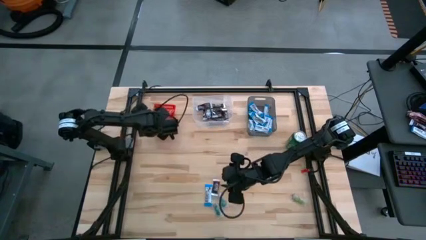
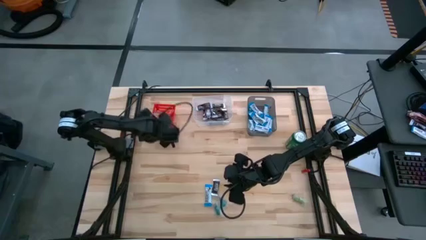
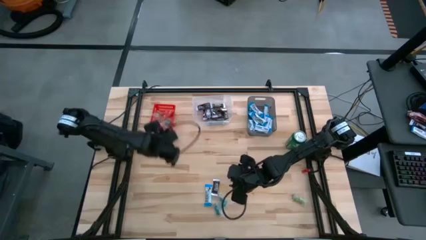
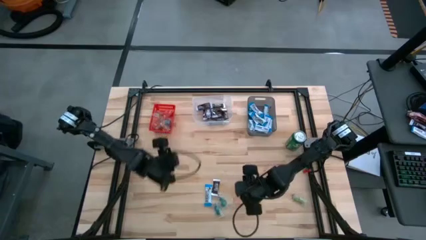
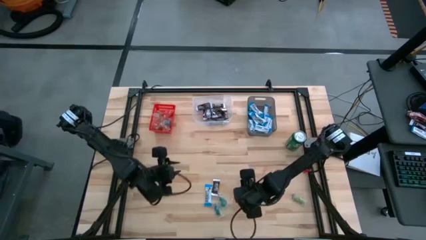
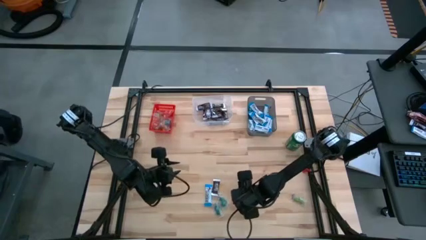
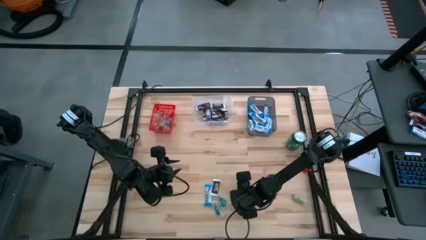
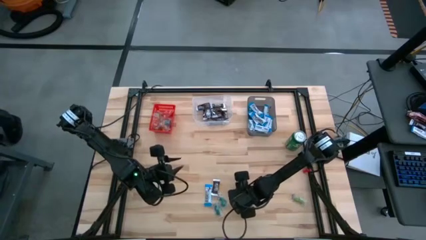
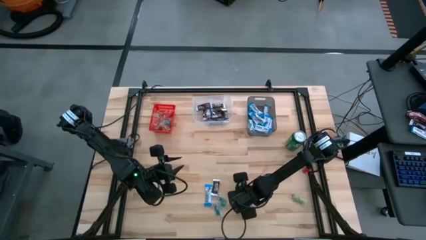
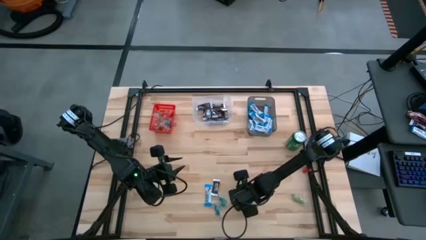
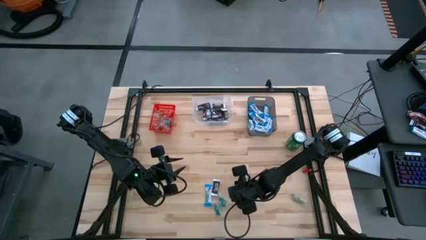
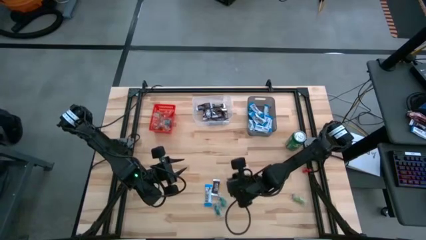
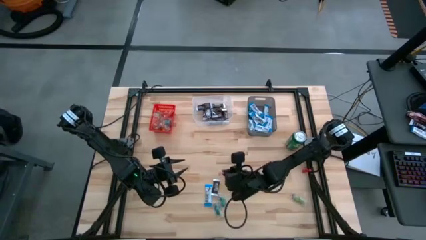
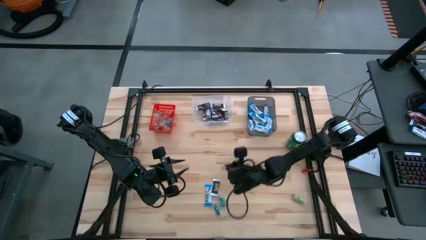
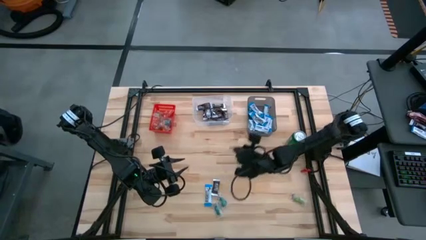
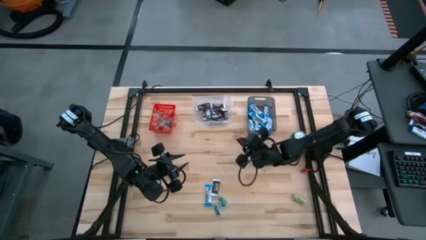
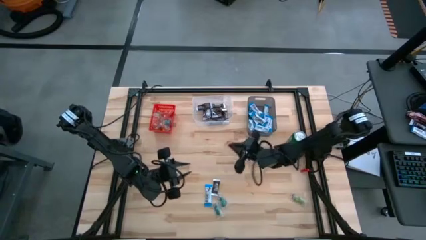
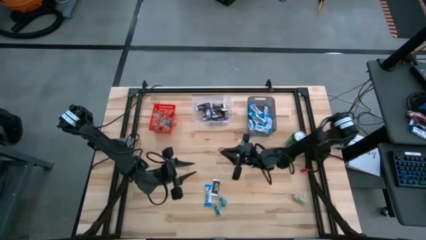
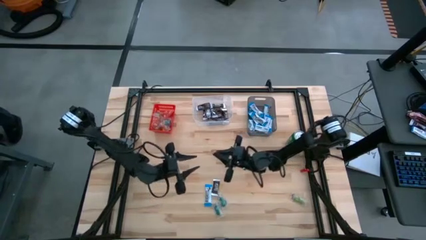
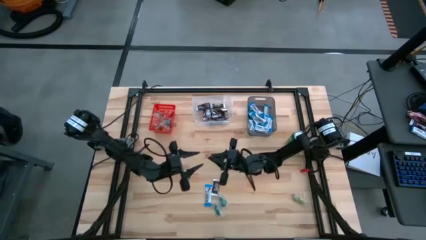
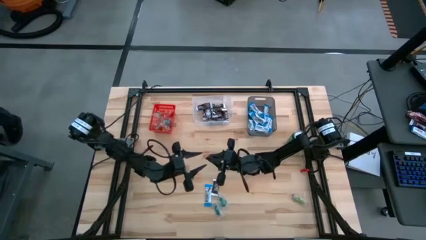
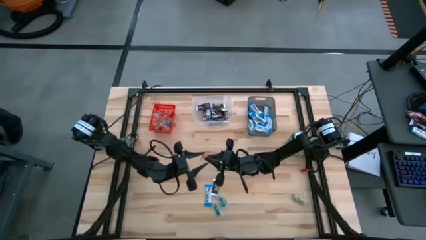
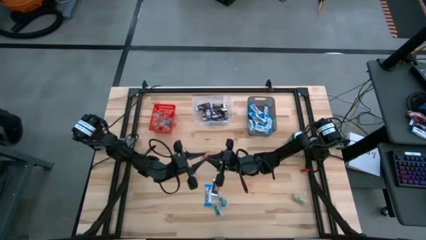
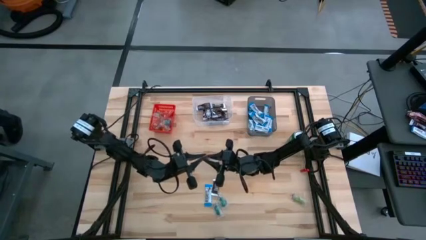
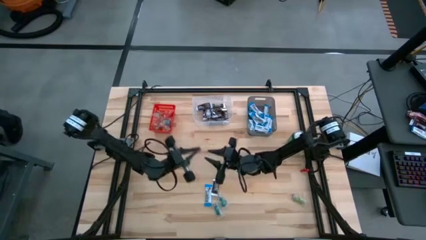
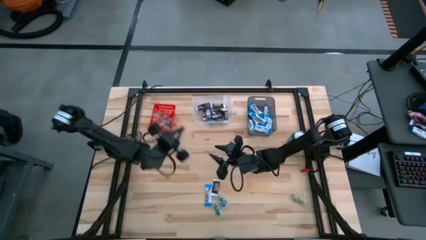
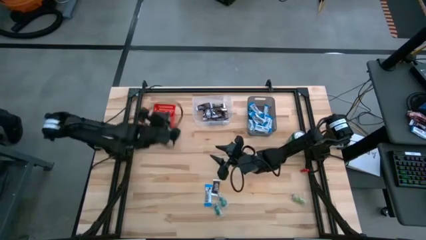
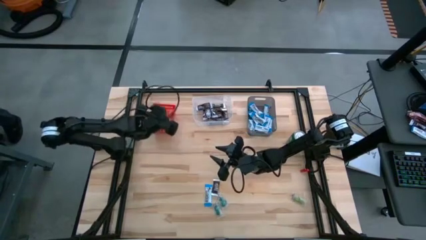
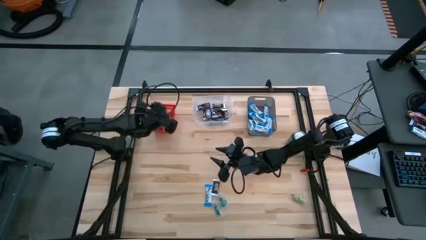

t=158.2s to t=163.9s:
Task: Sort candy
Put the orange candy into the red bin

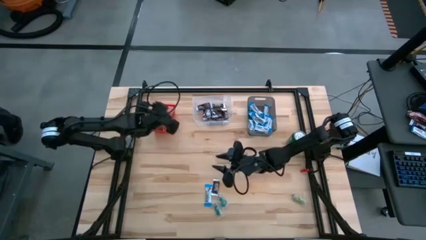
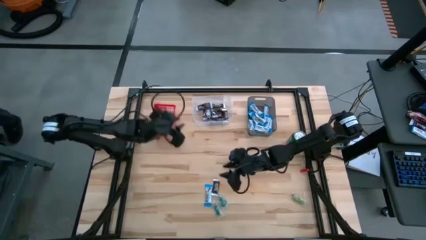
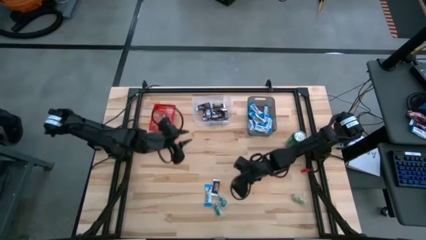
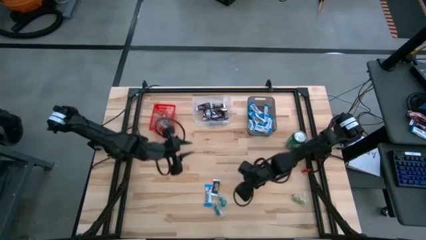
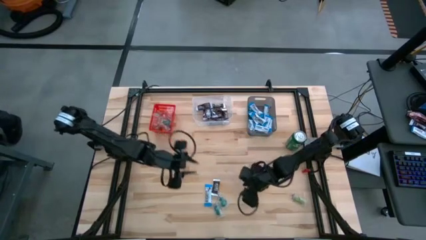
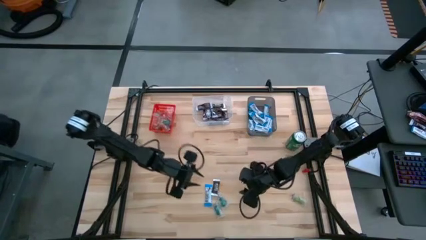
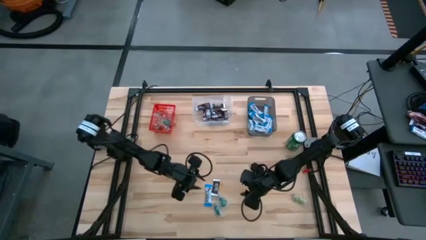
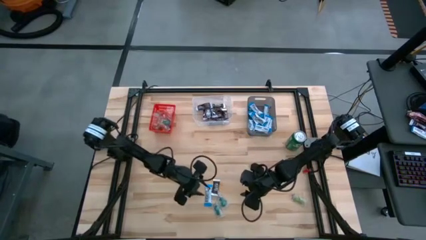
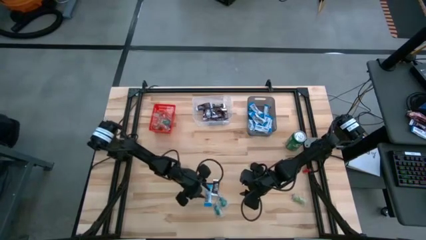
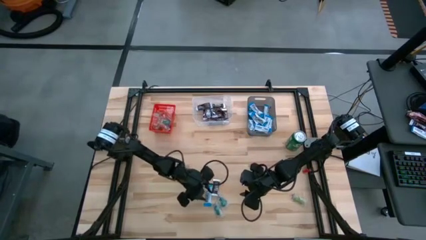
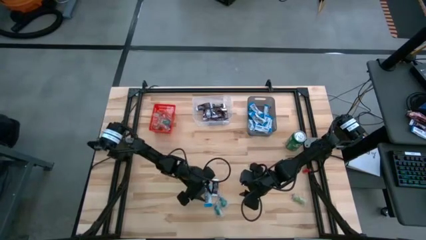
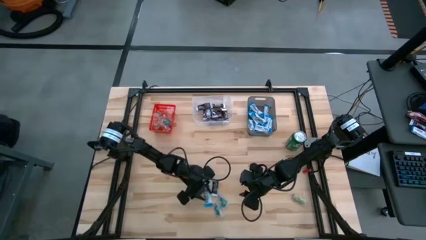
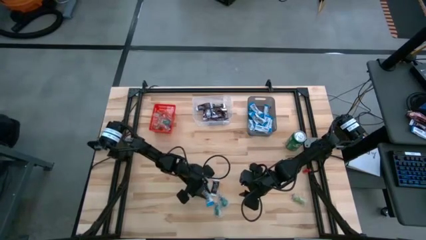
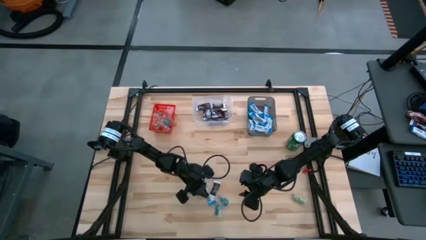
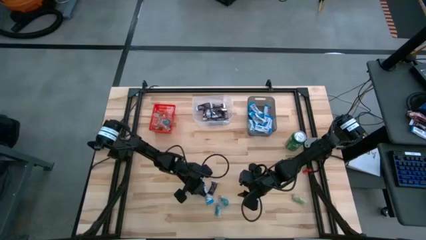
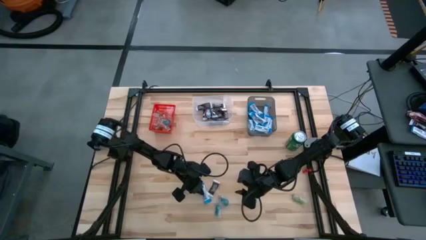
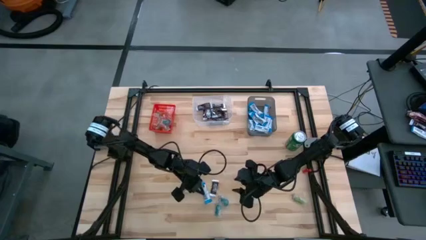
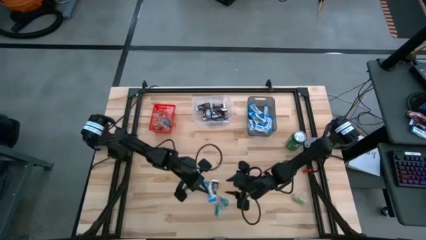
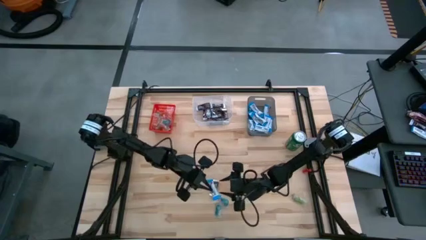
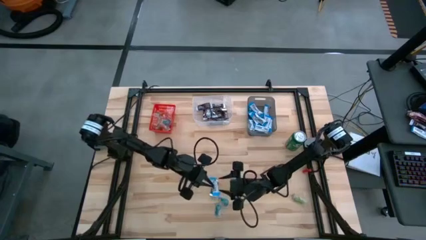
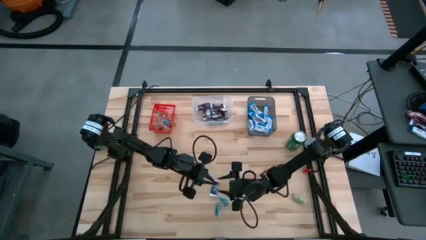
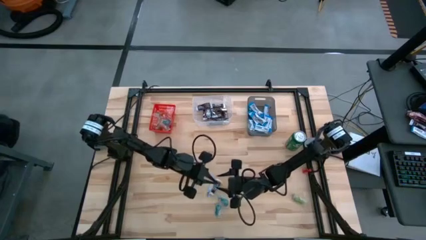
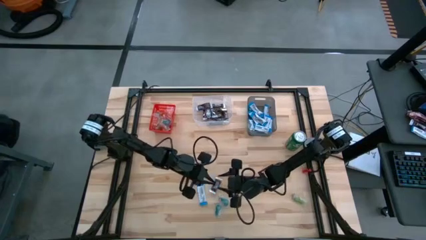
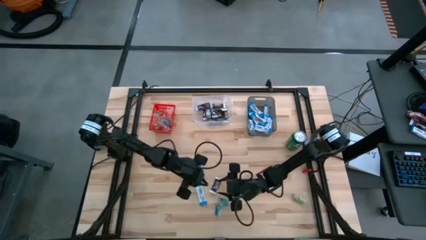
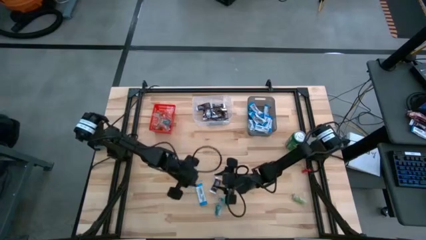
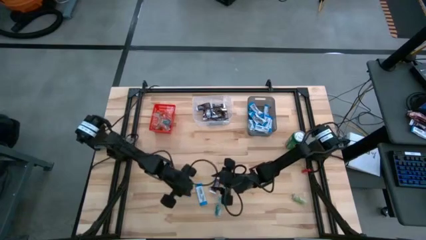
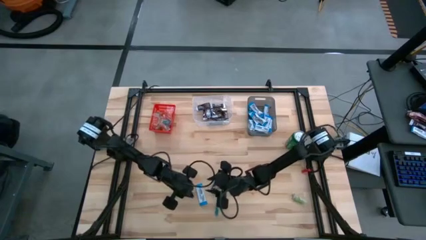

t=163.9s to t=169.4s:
Put the white chocolate bar into the black bin

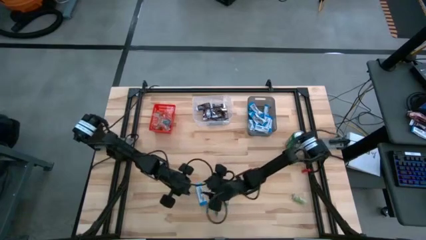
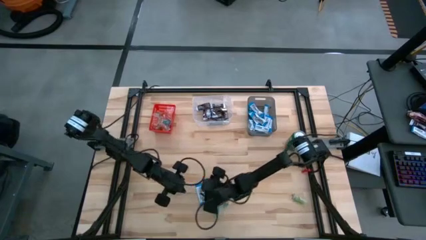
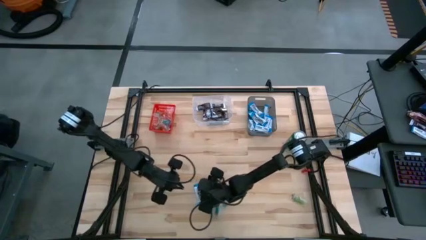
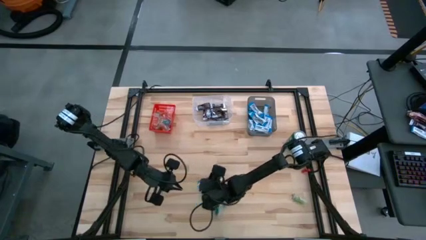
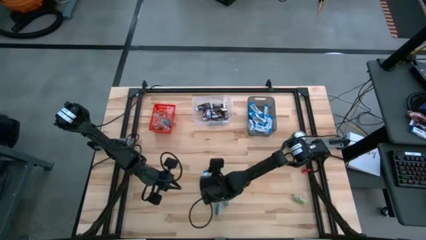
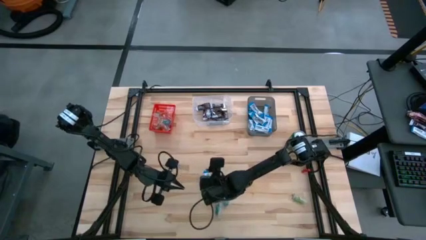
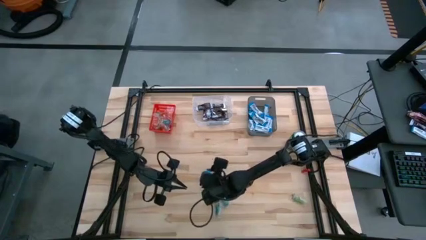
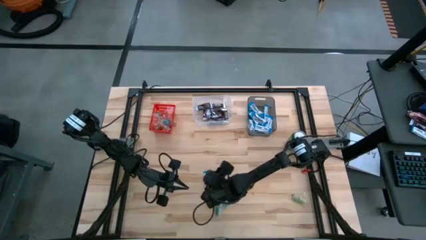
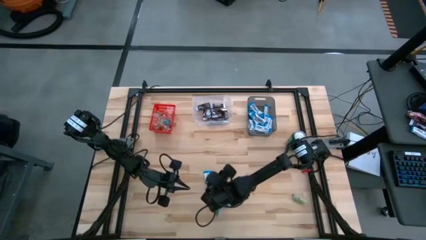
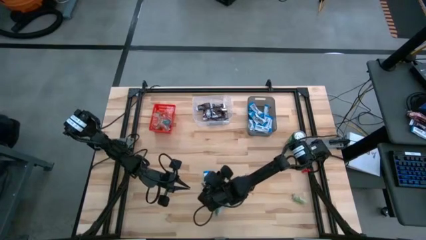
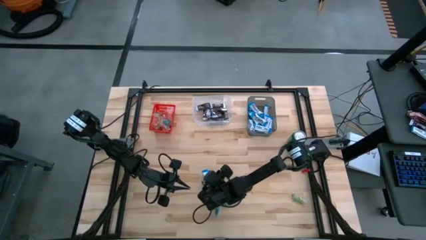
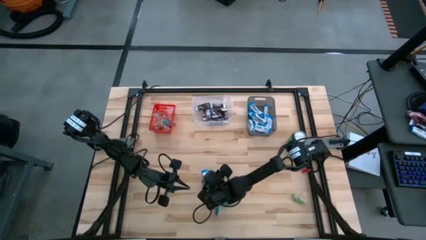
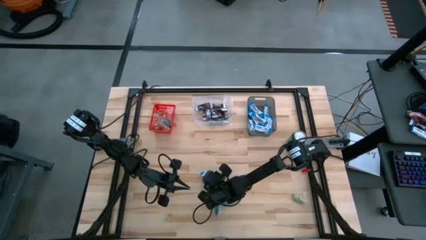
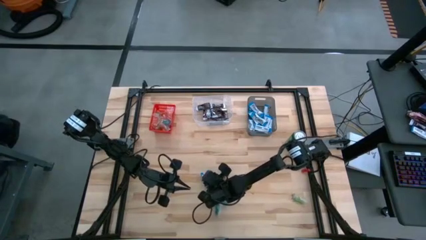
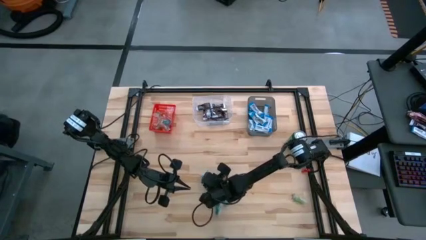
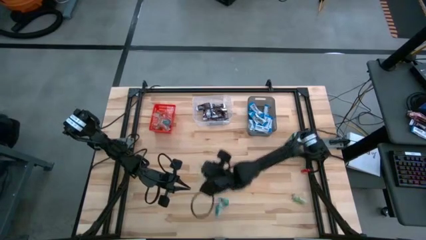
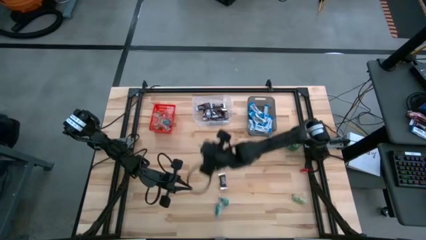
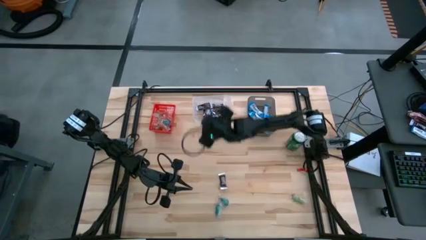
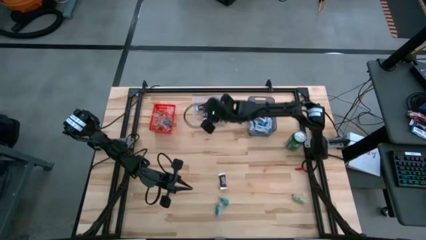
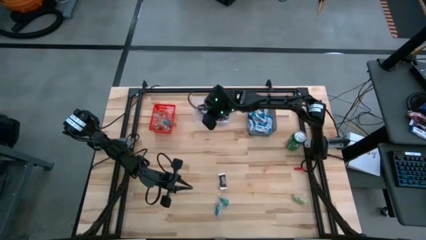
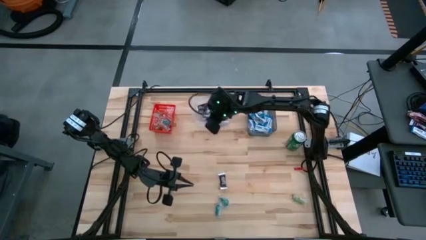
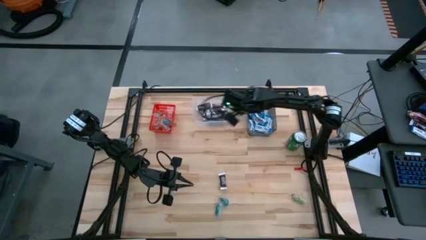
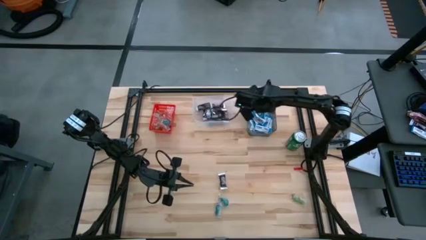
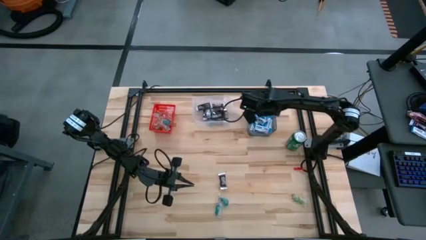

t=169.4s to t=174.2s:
Put the white chocolate bar into the black bin

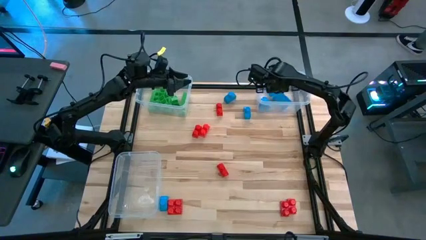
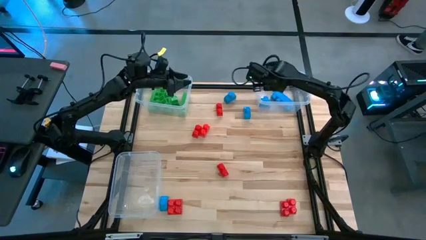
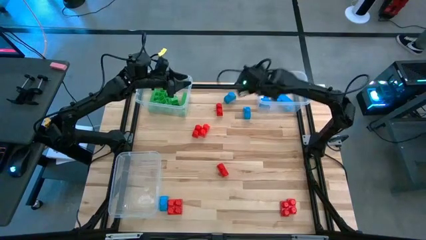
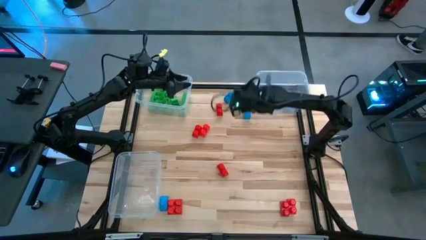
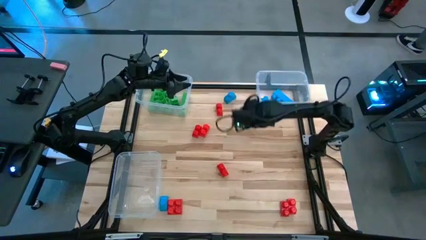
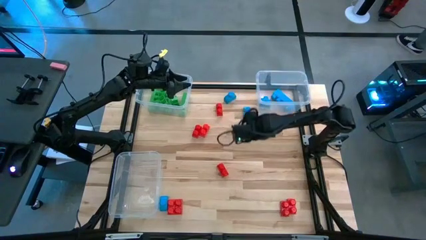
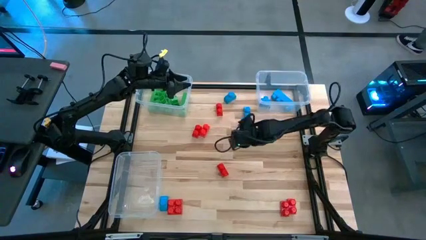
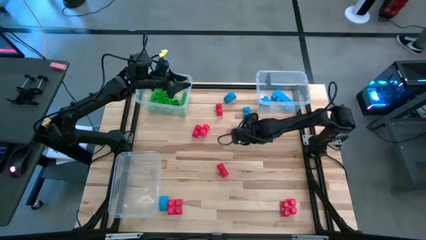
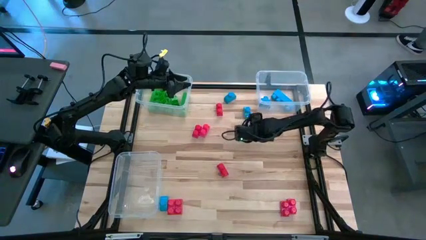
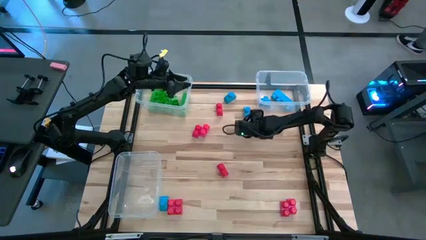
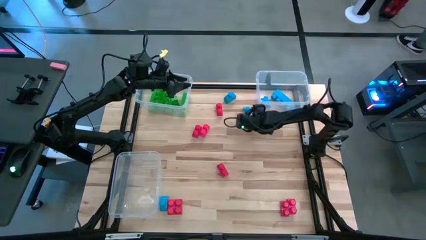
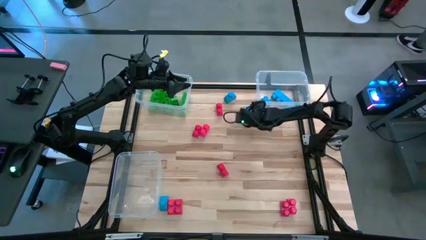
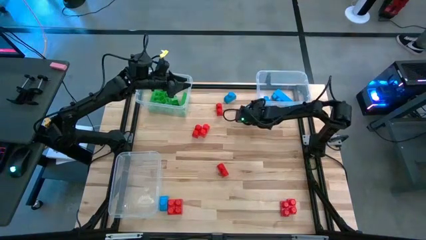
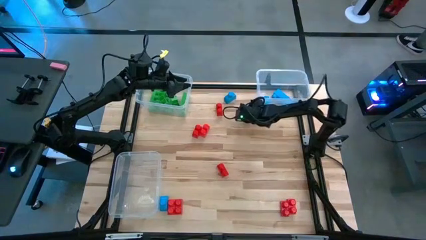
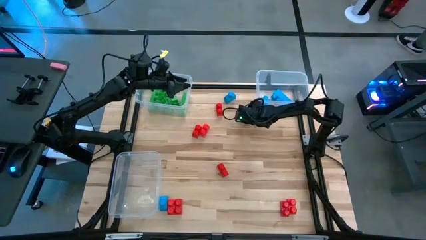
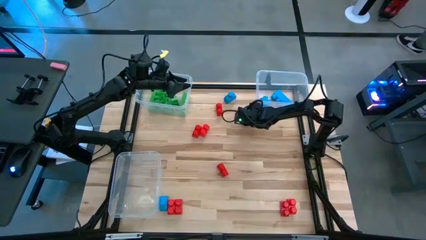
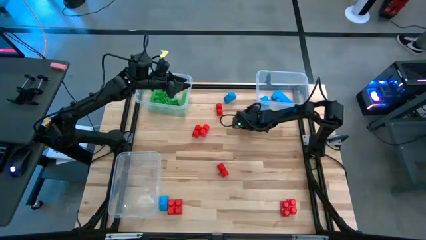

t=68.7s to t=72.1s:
Task: Sort blocks
Put the blue game piece into the top right transparent bin
